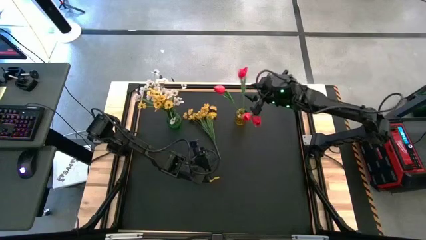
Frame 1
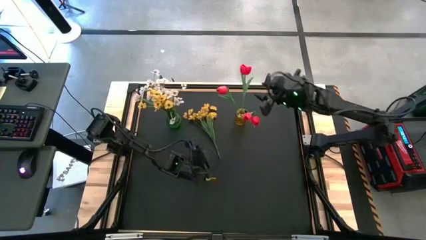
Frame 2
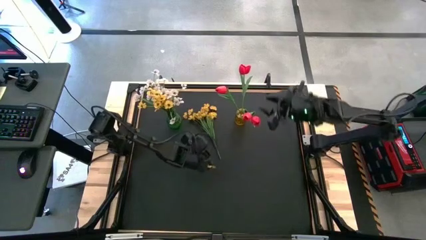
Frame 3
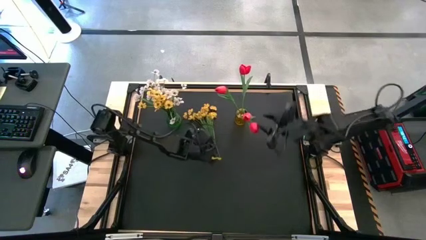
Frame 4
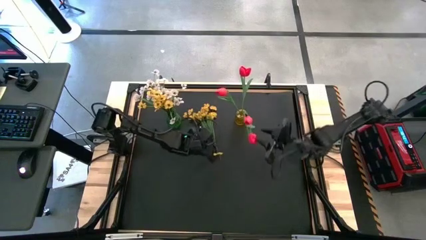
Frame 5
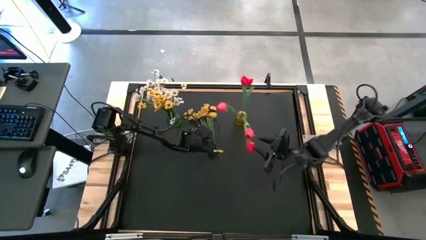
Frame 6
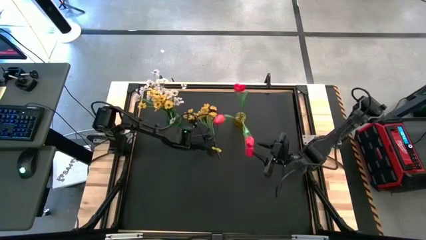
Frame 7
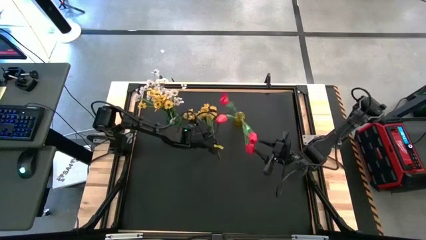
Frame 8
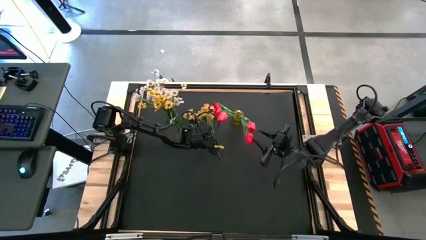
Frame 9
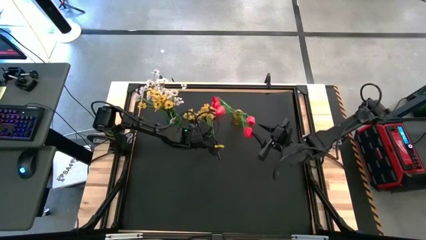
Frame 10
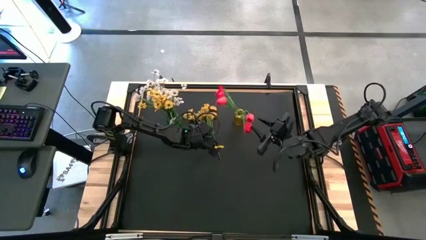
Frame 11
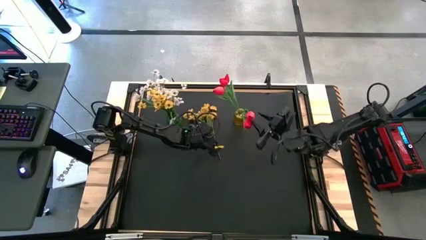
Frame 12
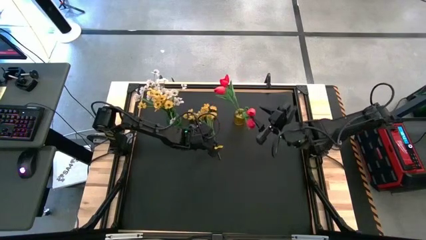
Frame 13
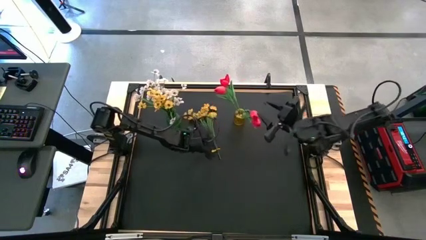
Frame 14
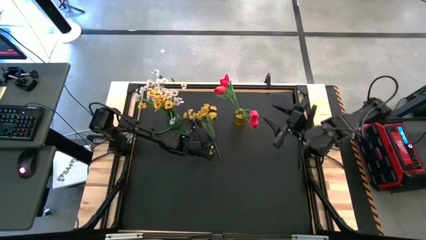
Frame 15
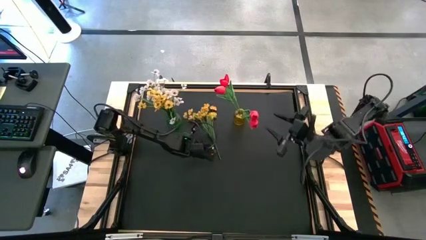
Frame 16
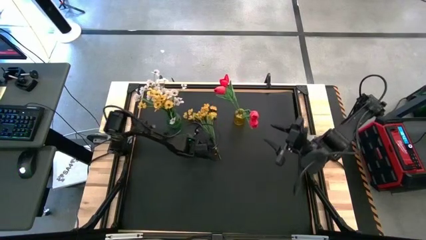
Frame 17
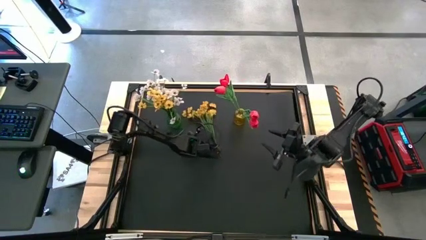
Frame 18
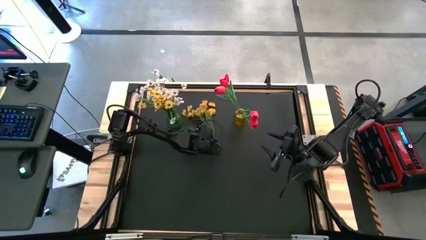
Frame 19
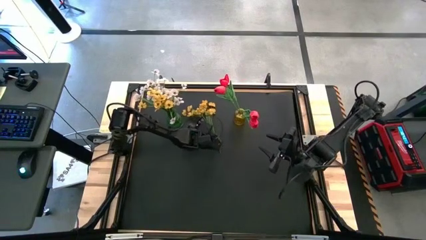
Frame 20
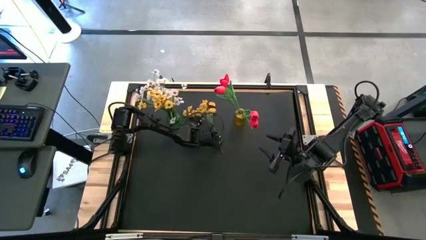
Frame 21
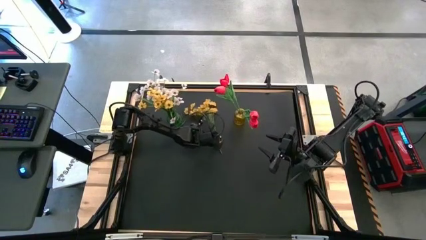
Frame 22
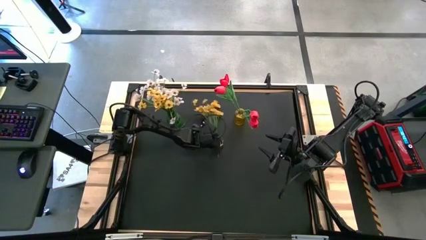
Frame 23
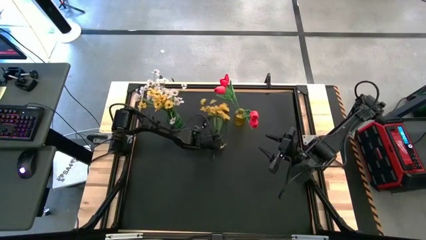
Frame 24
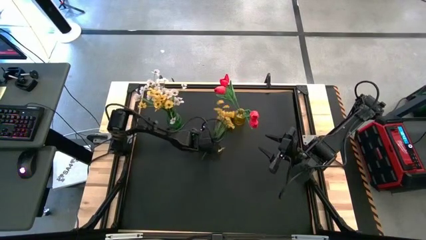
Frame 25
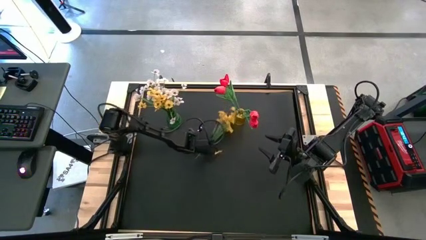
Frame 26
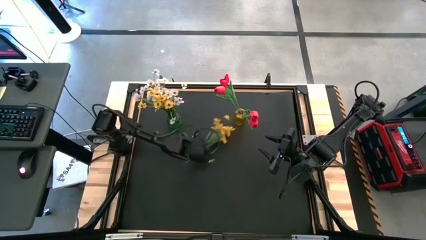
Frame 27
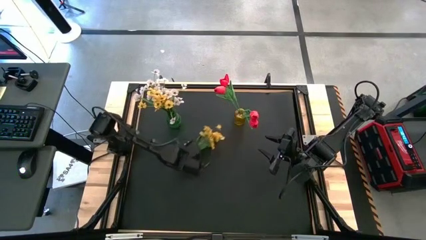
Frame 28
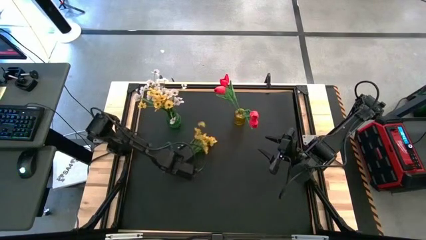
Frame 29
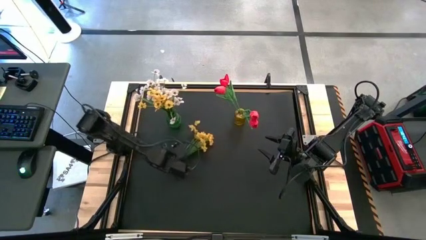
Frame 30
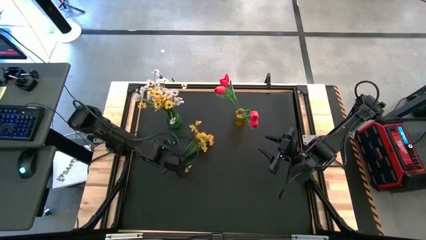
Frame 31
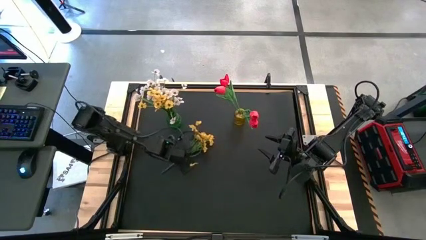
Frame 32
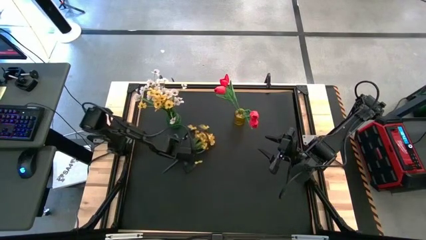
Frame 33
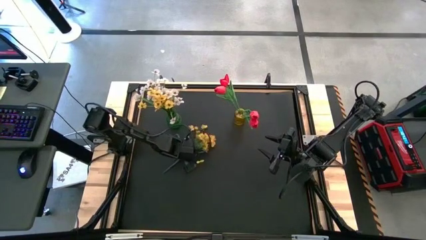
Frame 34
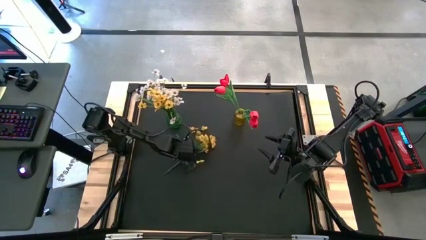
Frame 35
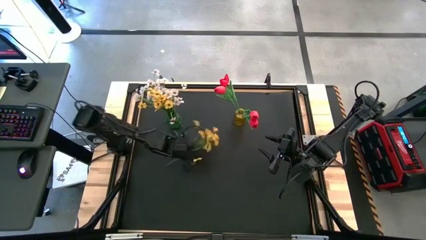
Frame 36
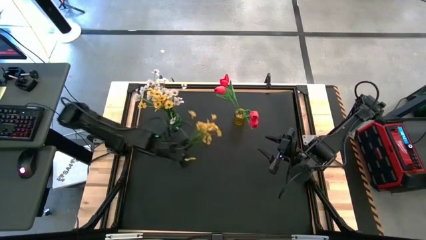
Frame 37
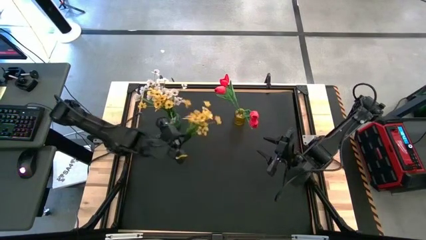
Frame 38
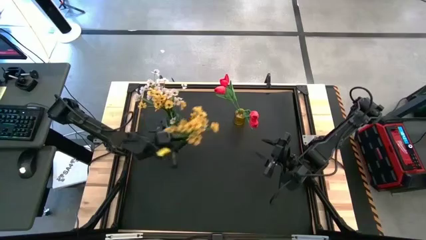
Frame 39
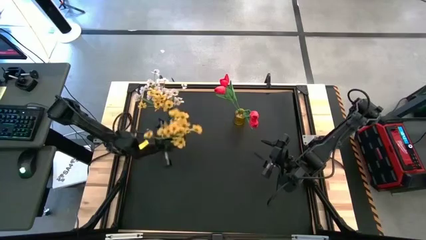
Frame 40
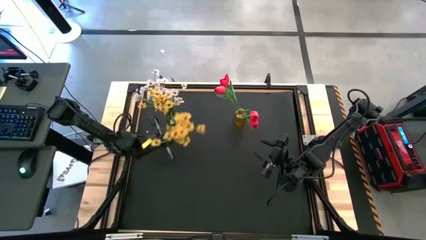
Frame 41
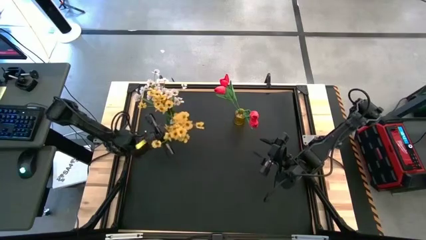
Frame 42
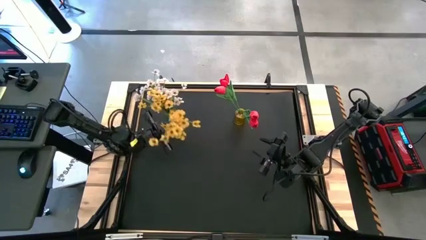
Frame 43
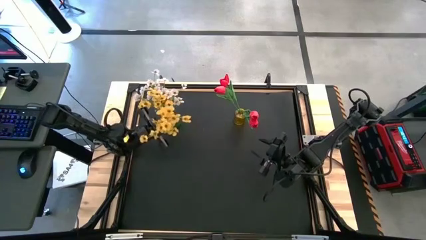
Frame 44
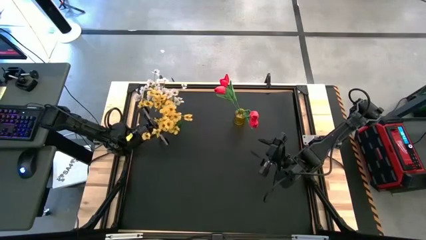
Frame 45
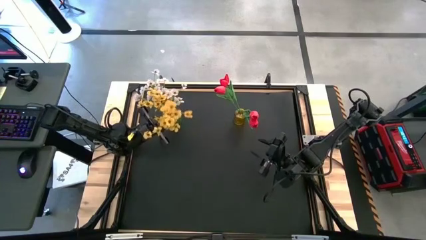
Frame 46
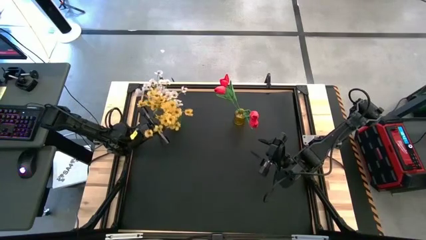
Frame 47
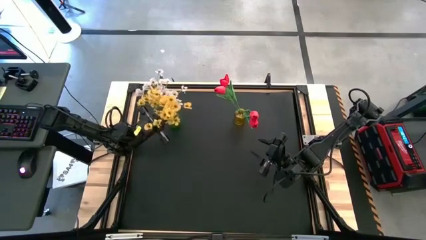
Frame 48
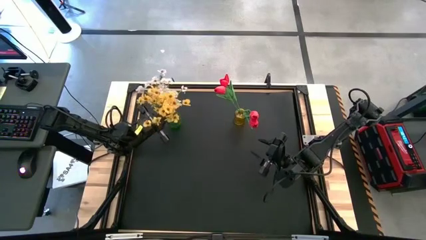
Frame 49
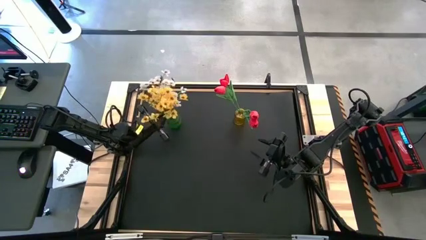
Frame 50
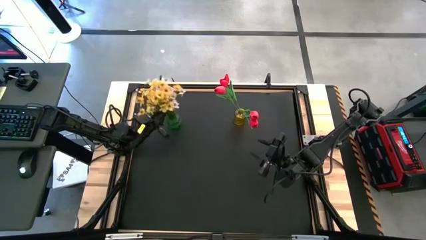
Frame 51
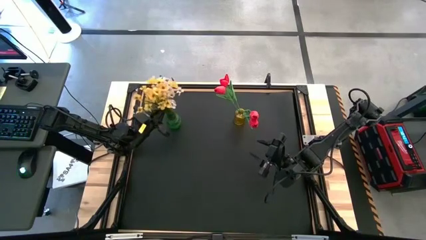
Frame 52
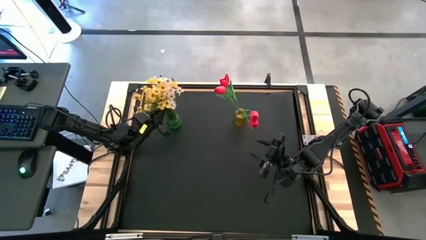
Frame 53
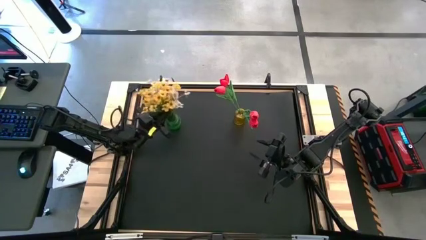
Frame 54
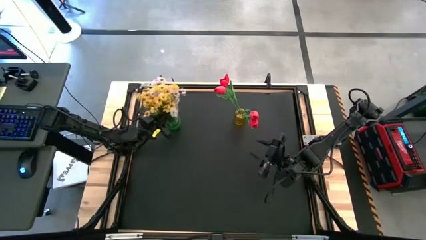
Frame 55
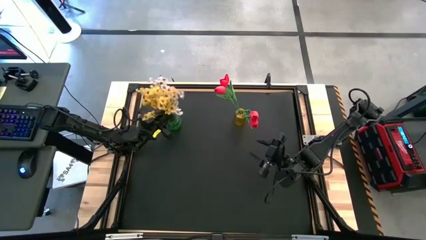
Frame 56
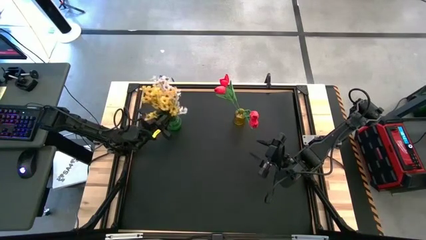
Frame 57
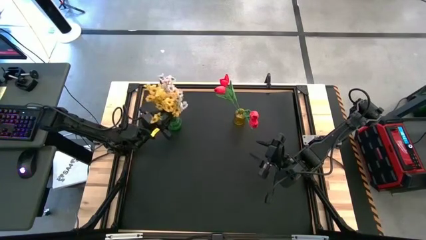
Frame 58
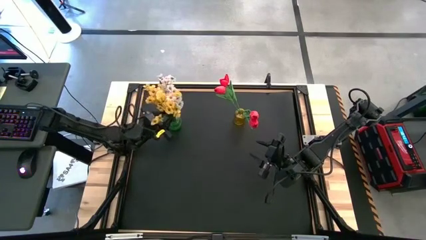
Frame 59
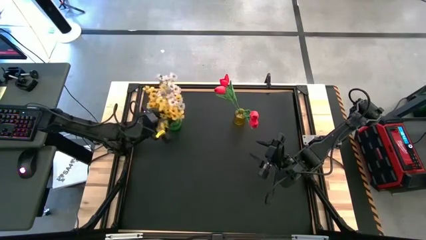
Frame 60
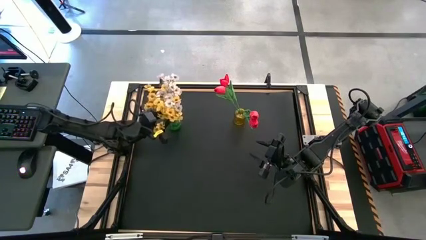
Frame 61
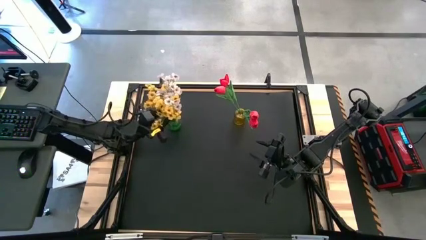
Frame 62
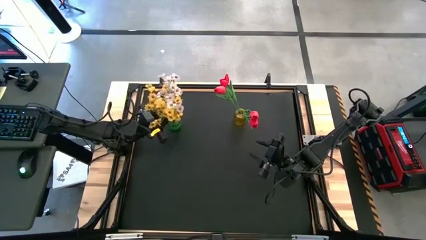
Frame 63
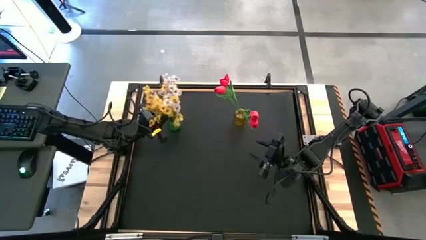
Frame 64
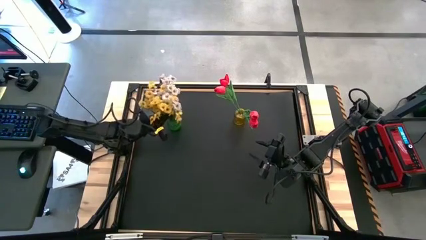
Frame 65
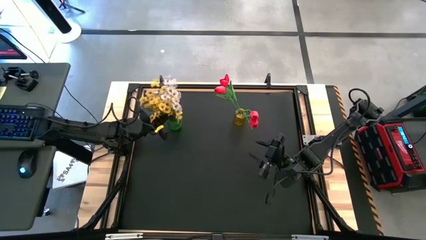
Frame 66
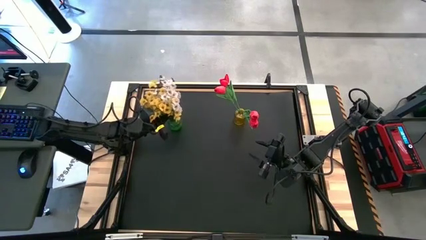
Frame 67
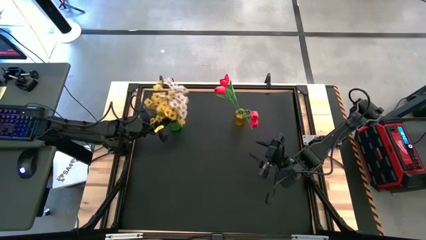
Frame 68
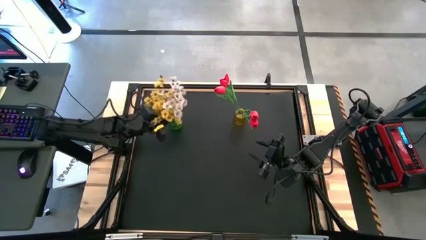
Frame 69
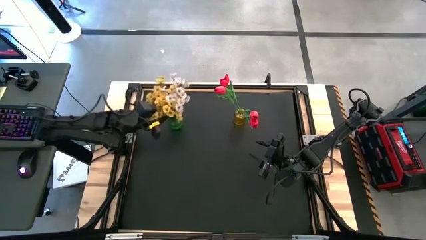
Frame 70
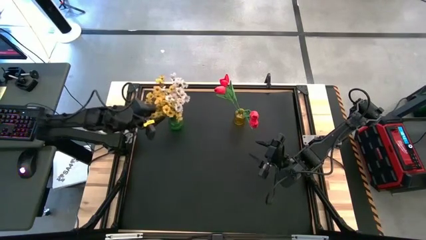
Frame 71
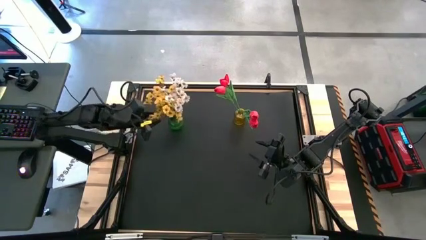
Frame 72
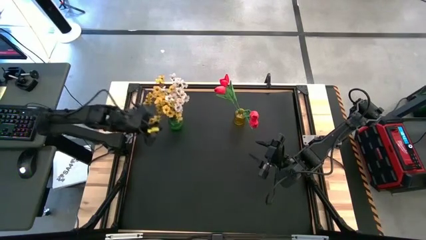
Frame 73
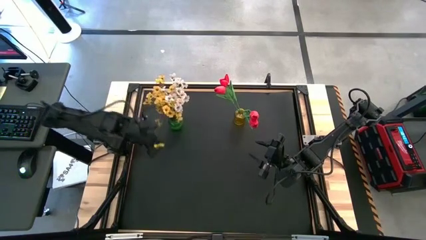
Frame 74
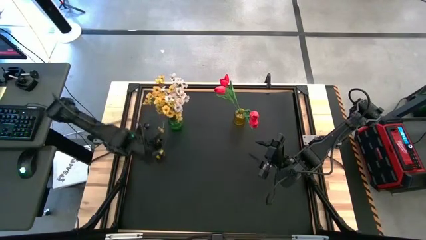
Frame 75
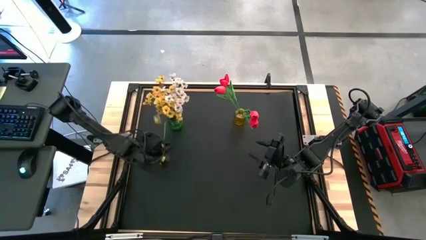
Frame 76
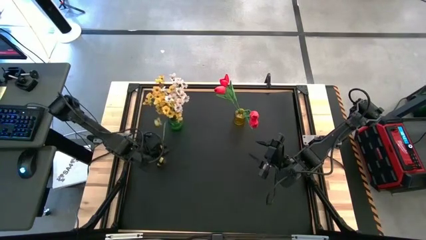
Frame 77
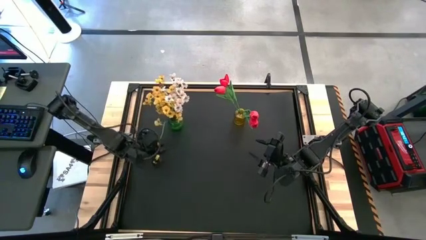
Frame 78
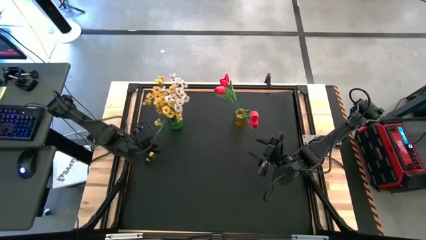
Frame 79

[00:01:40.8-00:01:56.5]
Task: Sort flowers into vase by color
Put the yellow flowers into the green vase
